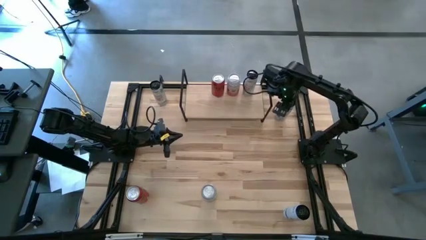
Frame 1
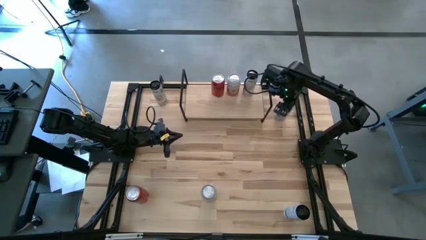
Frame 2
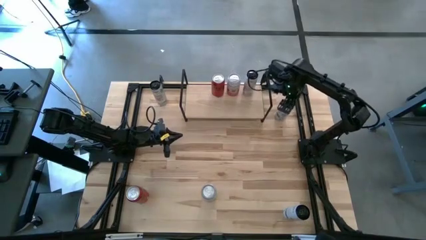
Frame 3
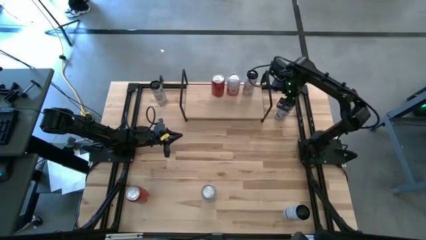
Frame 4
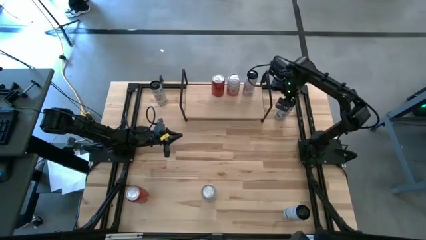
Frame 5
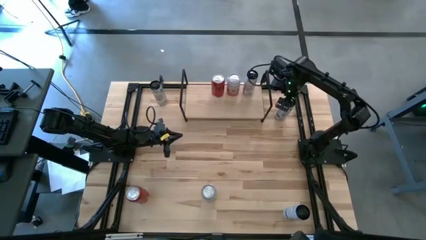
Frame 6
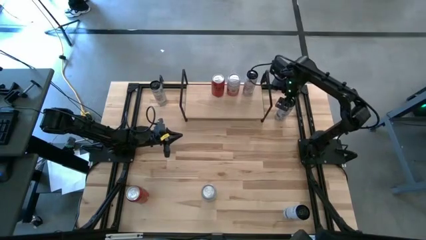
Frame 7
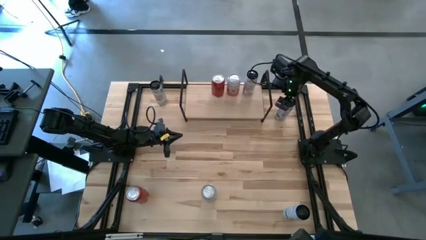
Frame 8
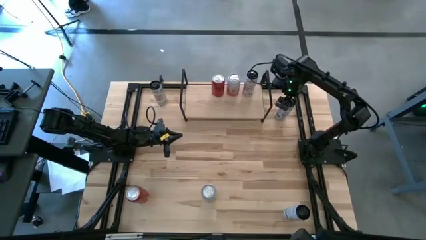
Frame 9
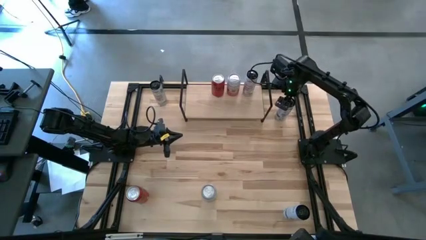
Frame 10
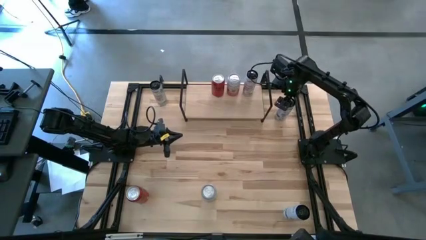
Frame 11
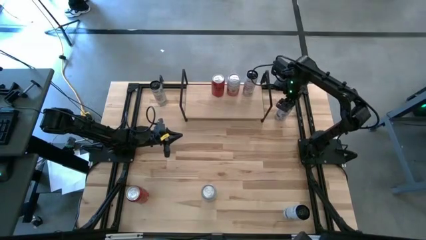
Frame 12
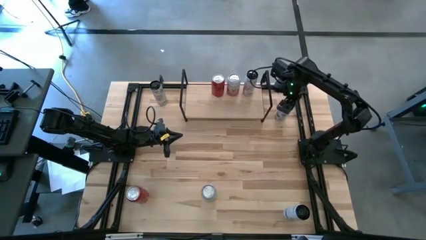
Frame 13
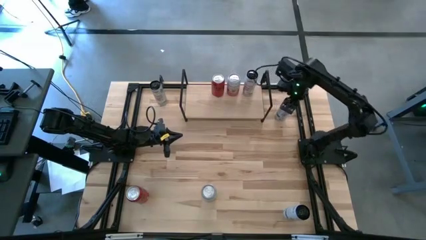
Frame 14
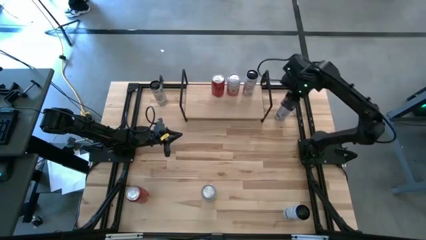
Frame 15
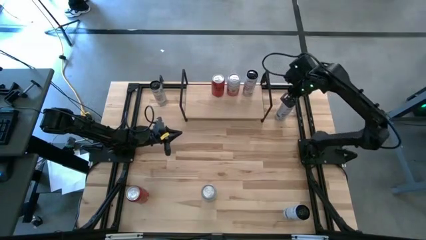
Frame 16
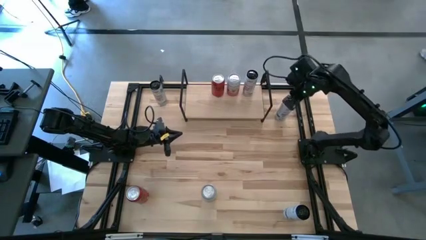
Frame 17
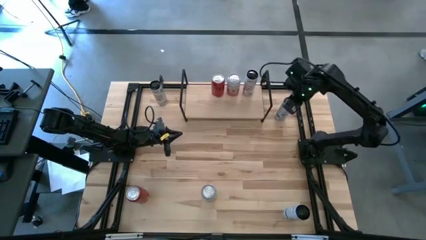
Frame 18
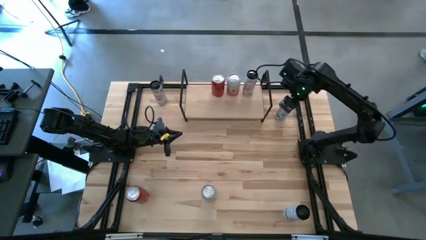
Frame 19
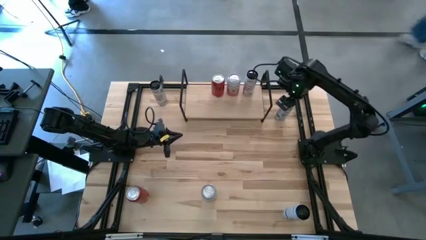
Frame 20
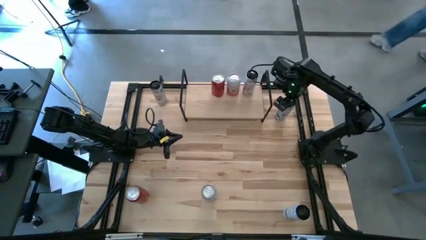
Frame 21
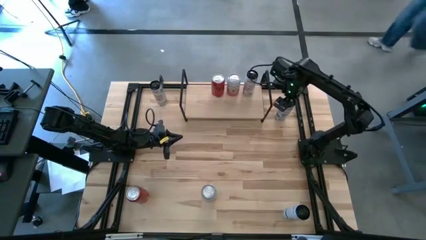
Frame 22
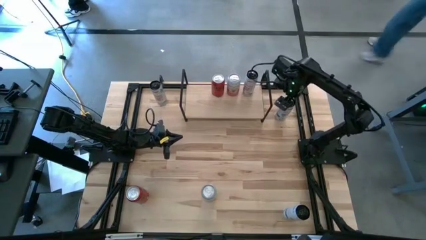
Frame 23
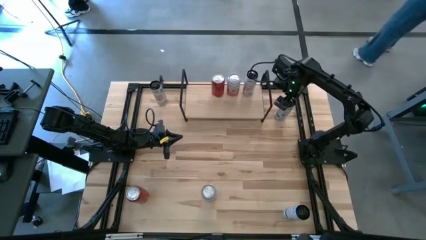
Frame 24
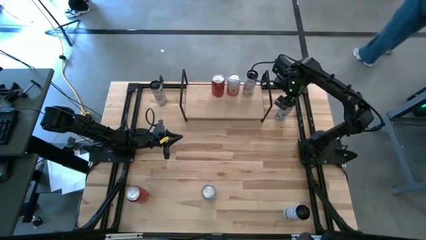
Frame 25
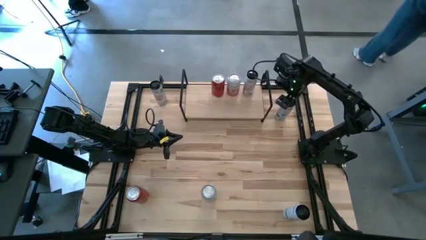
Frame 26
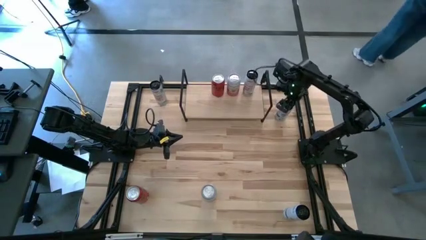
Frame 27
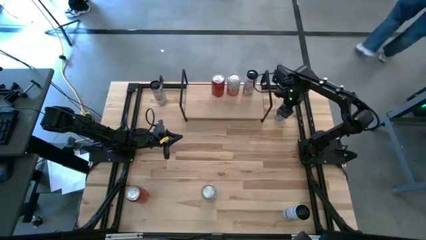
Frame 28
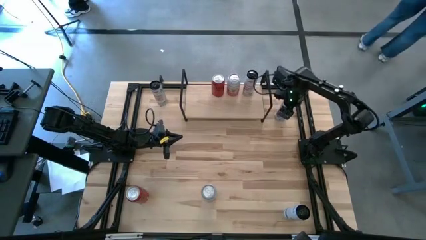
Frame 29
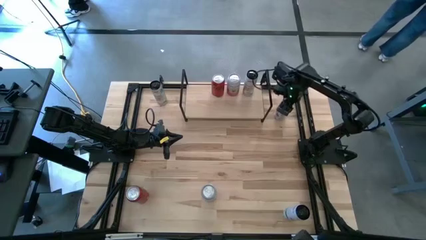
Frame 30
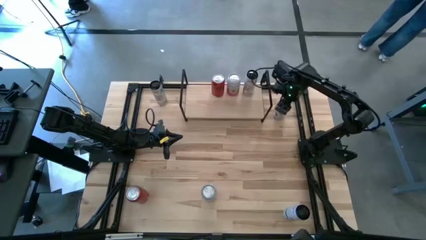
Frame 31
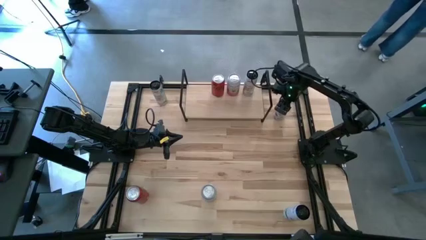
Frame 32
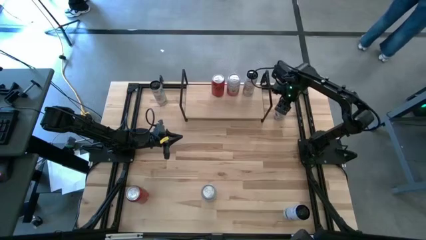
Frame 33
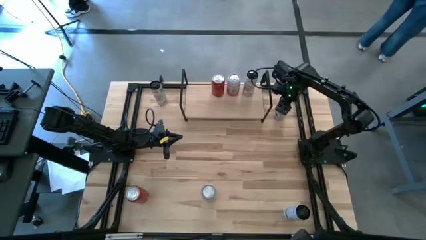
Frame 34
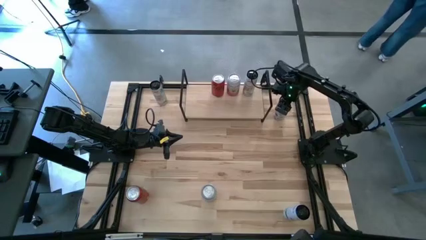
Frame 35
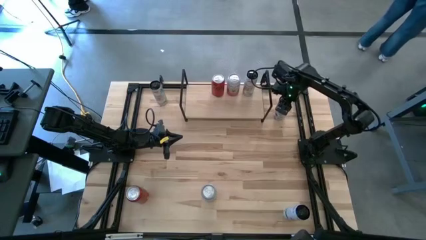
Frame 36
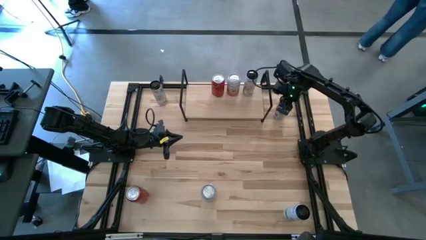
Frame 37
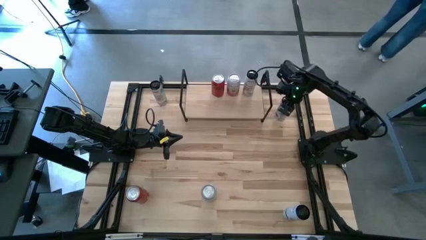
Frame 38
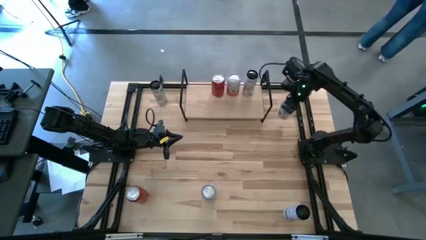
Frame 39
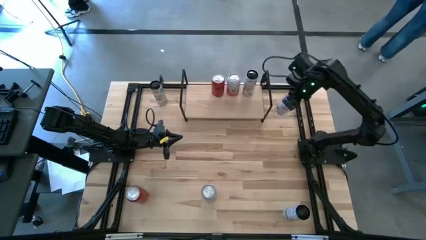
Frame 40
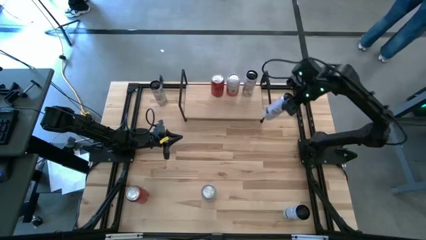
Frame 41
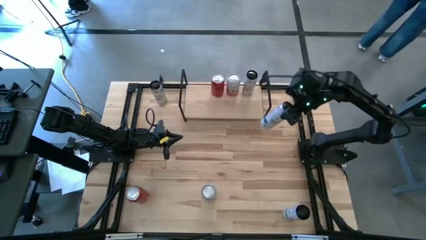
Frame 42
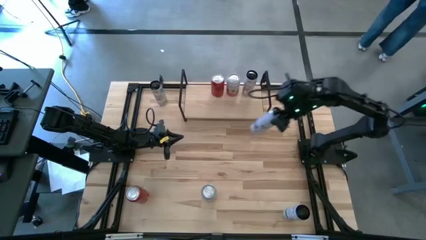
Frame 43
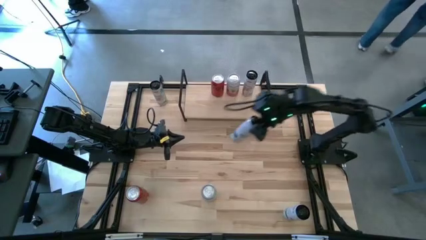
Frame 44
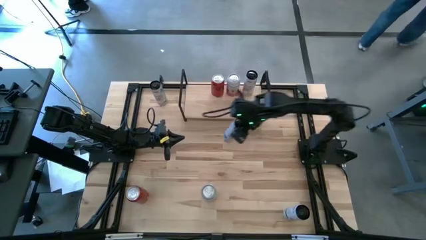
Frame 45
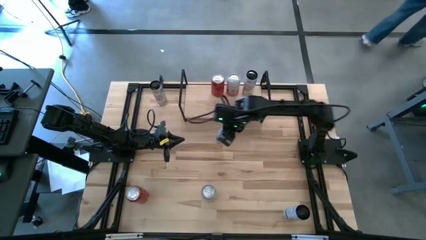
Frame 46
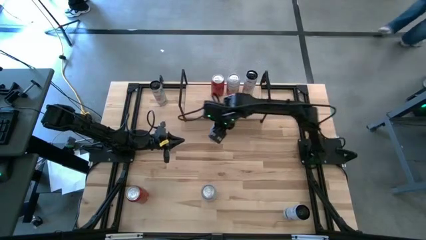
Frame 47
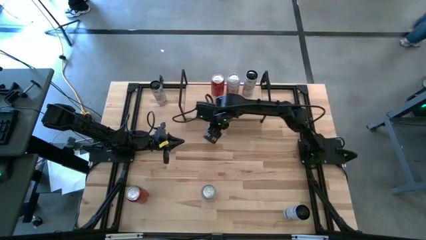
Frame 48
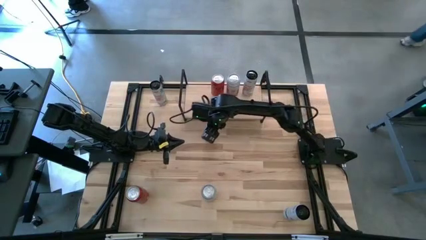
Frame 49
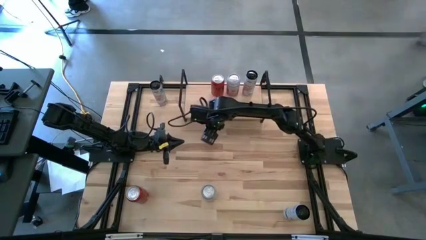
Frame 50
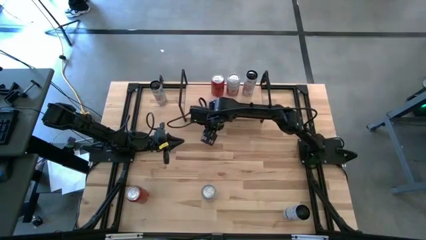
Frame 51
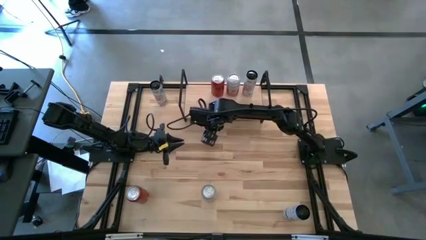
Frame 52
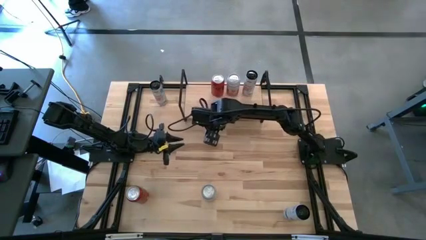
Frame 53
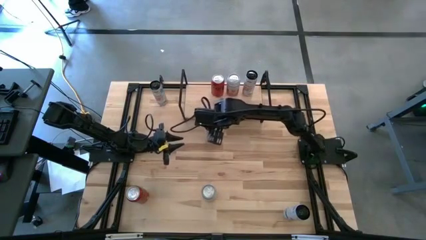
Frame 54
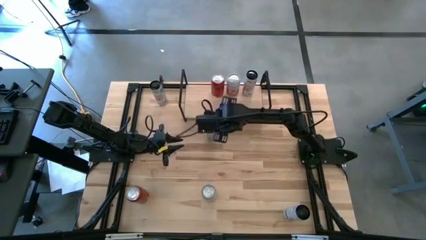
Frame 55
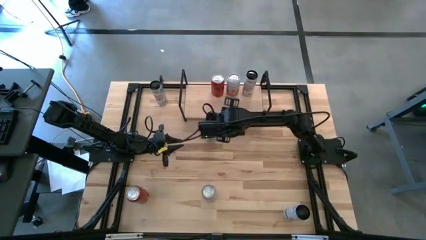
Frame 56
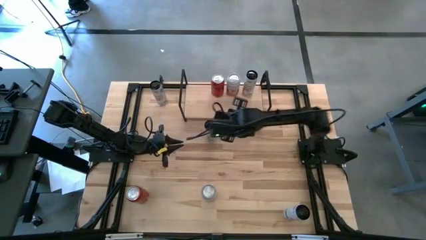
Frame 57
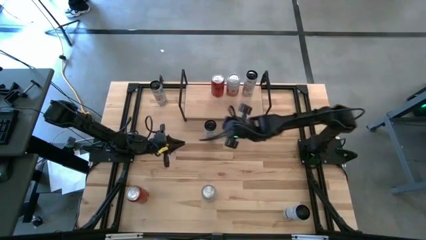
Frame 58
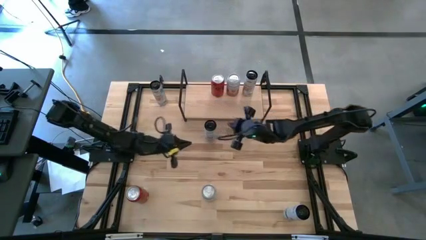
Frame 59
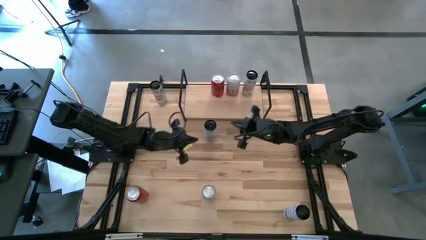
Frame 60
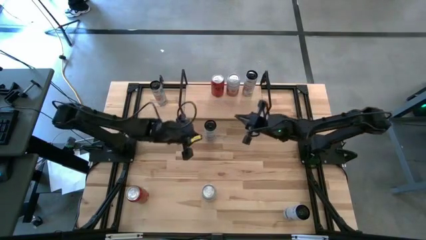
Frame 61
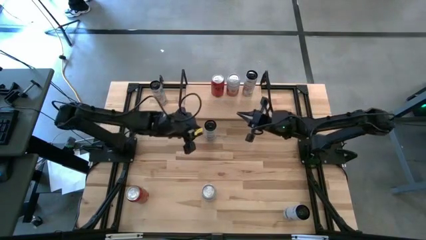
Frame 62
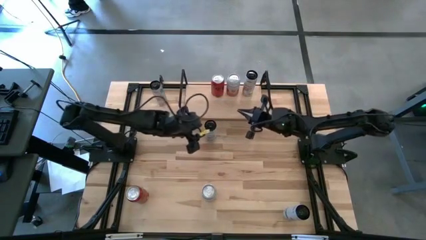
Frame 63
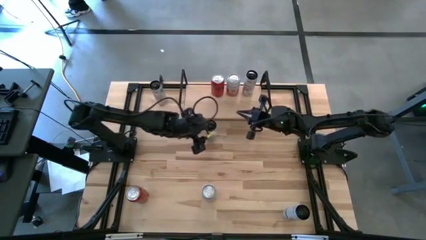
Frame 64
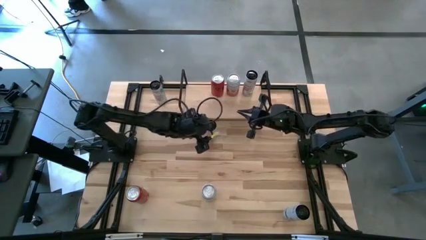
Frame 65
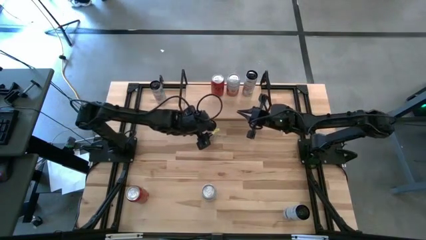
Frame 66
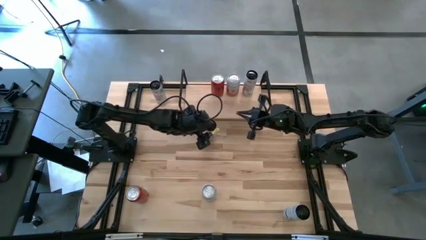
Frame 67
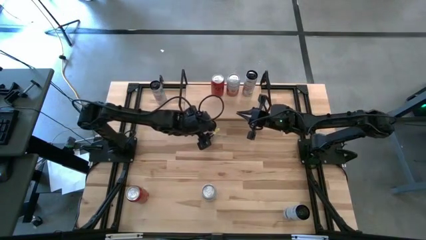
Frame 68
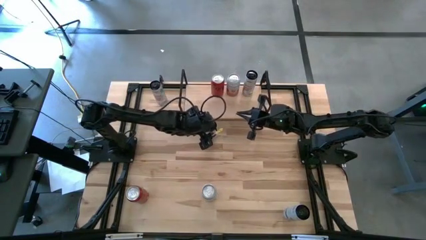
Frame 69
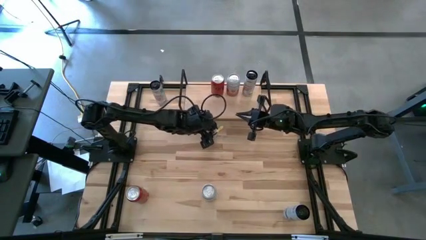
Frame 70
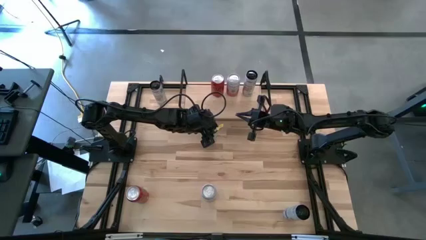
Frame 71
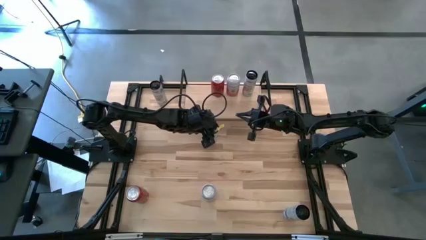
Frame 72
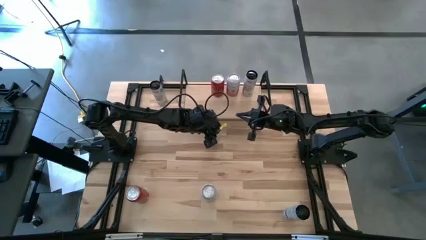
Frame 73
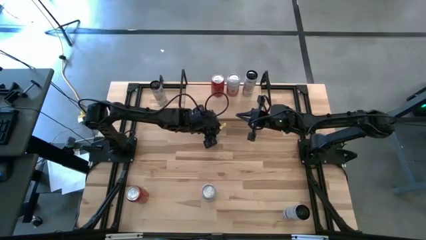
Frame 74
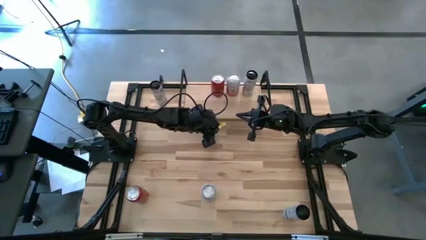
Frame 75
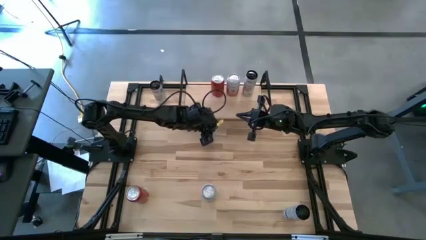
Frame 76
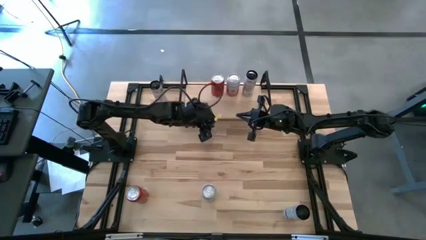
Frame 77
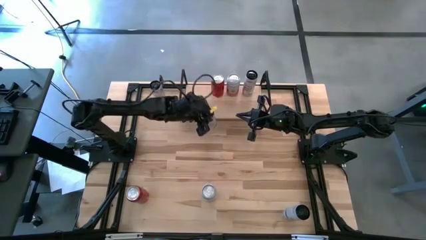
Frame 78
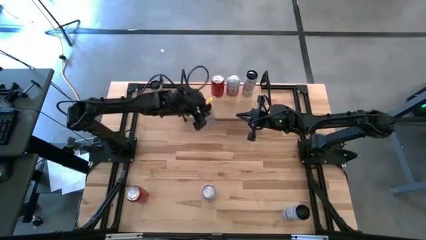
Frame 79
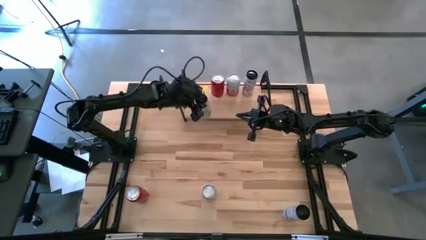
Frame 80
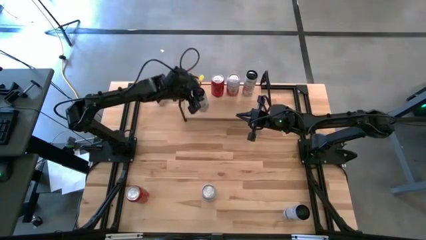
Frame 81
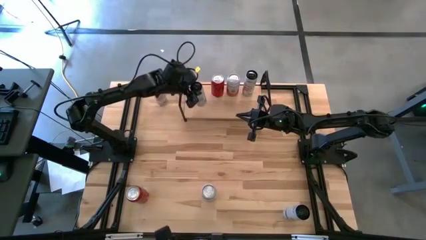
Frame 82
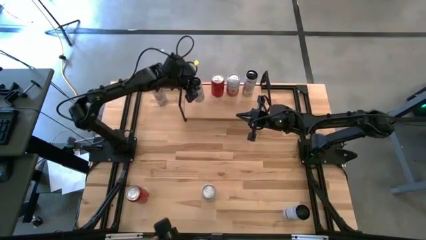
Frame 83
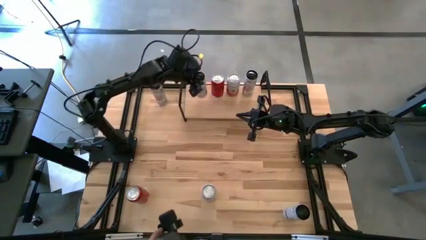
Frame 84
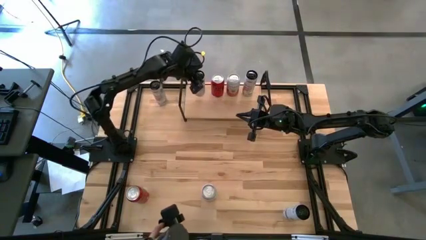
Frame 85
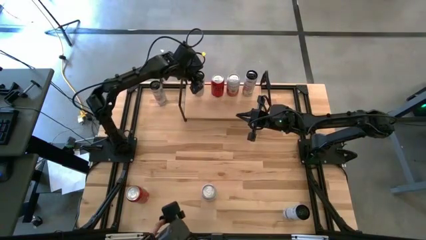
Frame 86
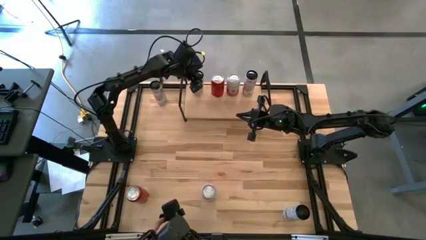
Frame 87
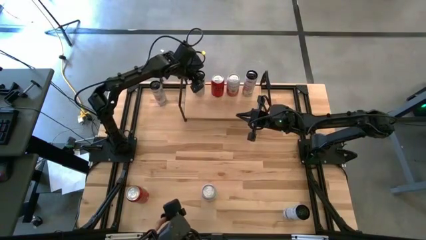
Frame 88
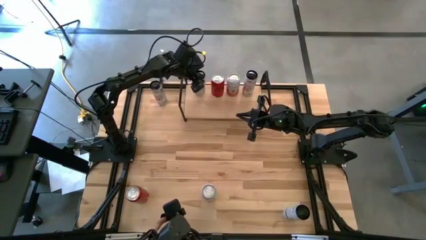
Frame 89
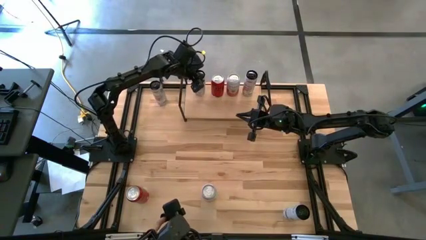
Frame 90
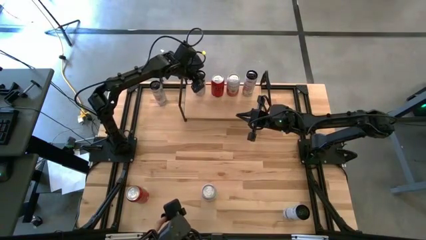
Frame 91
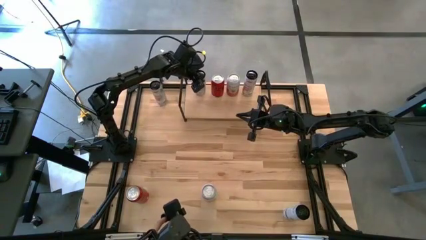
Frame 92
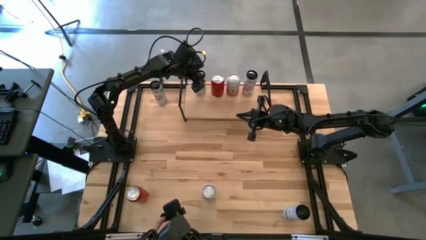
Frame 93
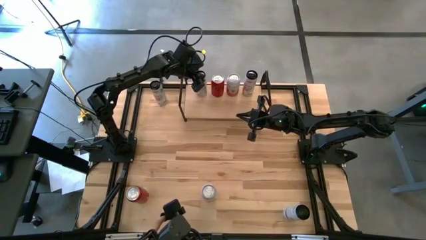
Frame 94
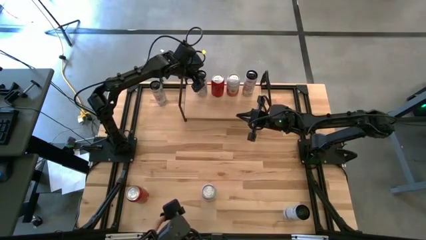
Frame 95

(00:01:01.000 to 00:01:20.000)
Task: Place canned beverage on shelf
Put the right white and blue soda can on the shelf
